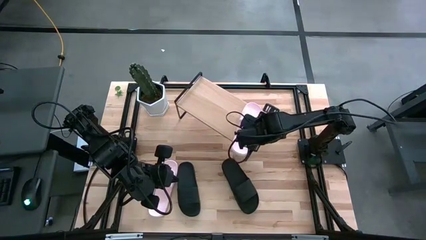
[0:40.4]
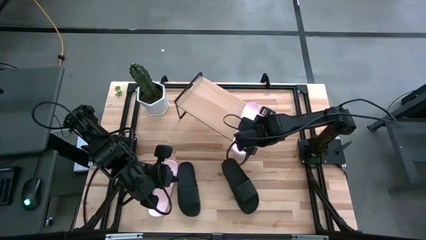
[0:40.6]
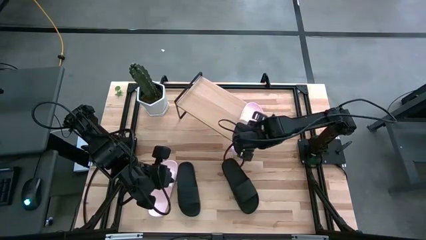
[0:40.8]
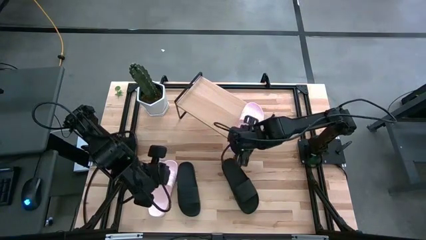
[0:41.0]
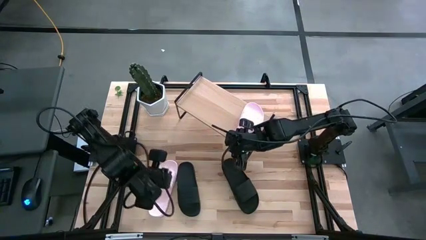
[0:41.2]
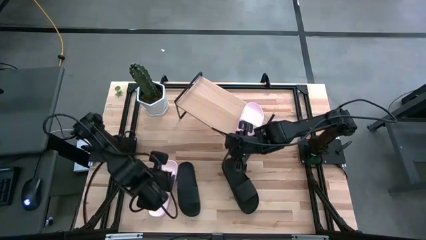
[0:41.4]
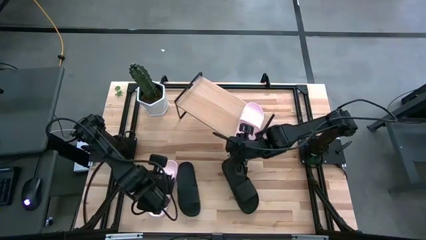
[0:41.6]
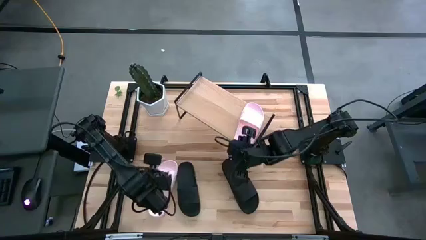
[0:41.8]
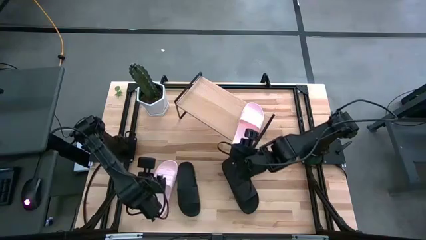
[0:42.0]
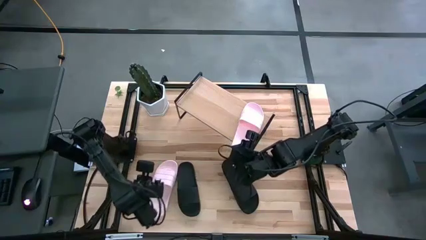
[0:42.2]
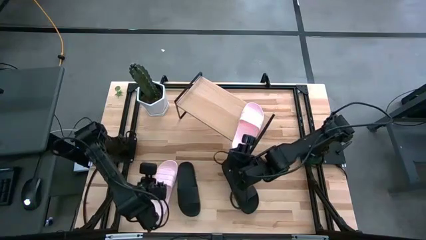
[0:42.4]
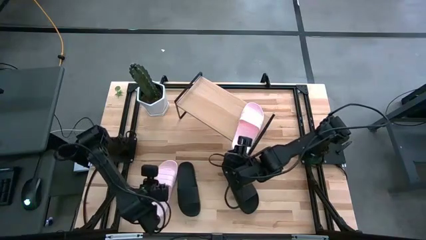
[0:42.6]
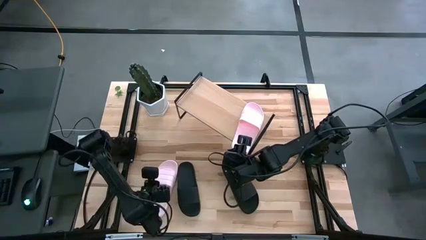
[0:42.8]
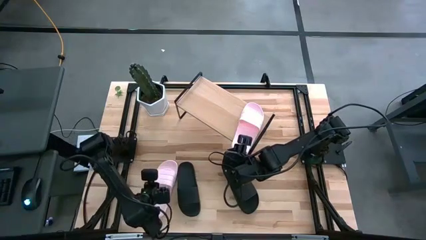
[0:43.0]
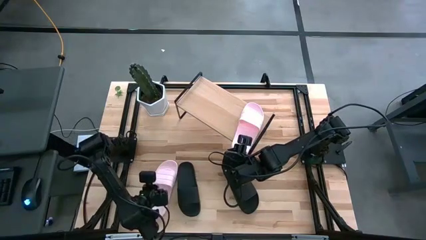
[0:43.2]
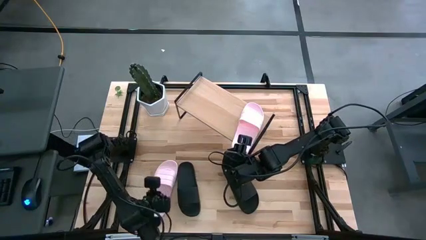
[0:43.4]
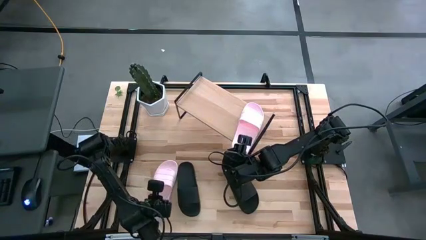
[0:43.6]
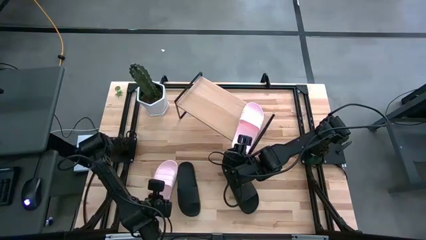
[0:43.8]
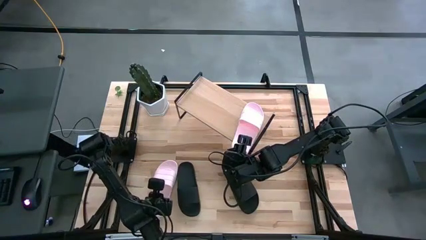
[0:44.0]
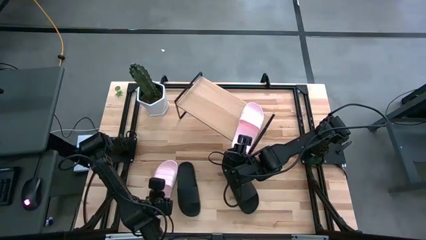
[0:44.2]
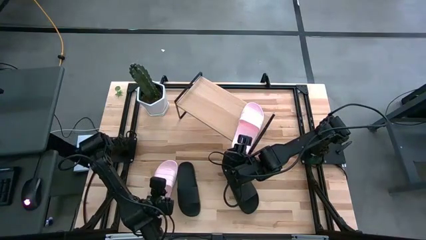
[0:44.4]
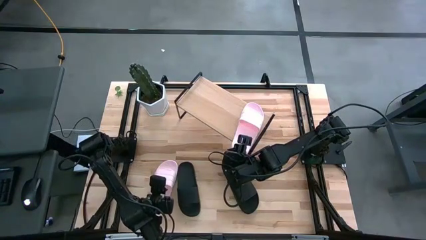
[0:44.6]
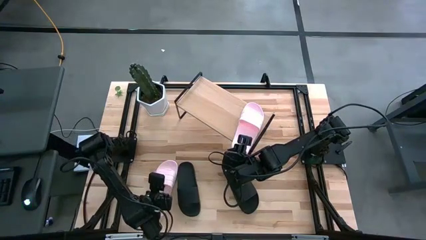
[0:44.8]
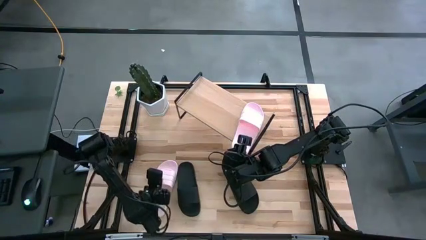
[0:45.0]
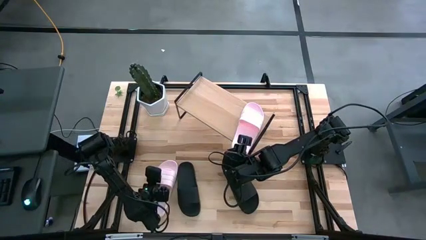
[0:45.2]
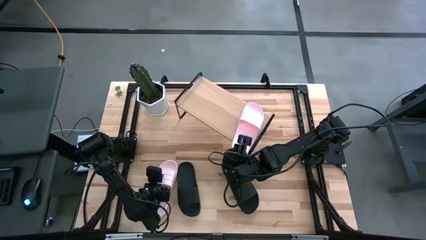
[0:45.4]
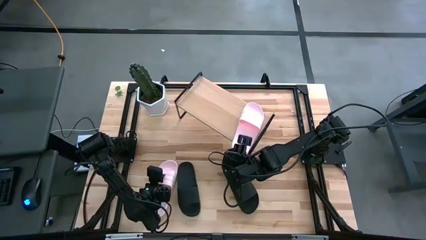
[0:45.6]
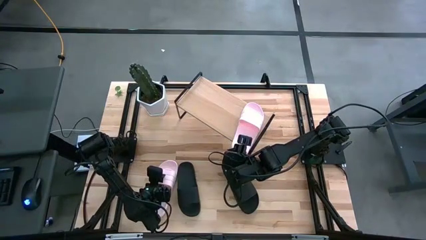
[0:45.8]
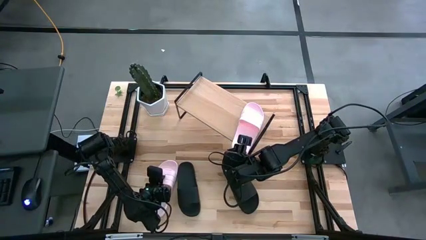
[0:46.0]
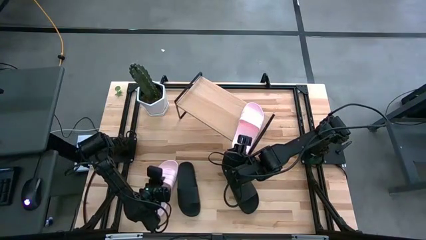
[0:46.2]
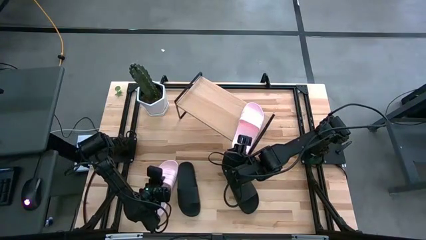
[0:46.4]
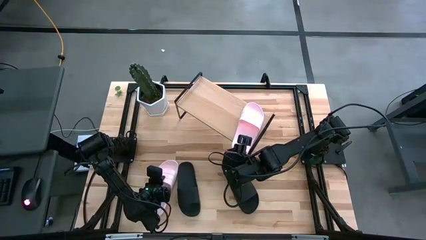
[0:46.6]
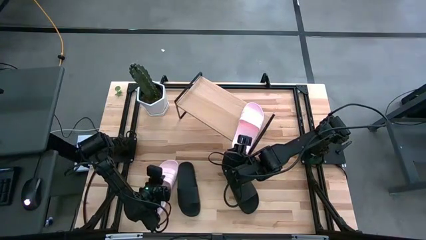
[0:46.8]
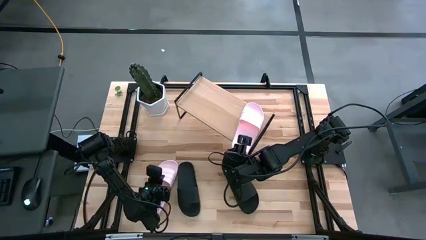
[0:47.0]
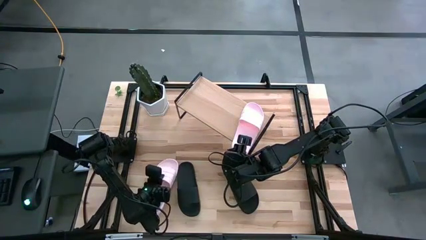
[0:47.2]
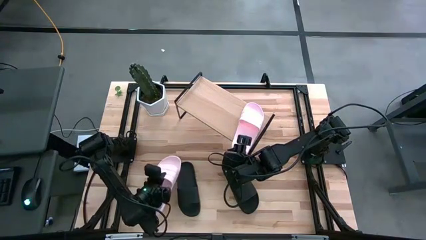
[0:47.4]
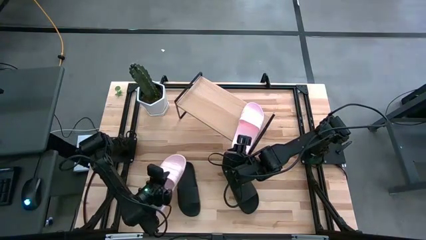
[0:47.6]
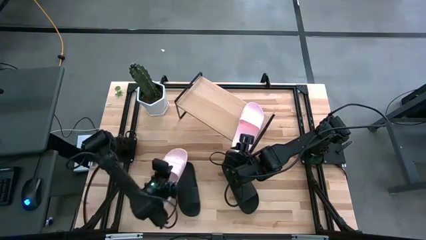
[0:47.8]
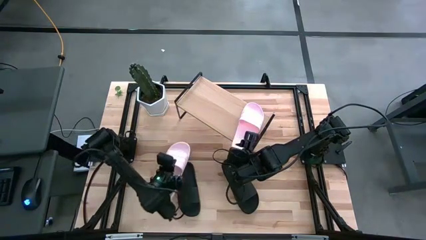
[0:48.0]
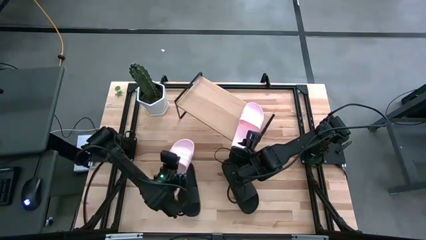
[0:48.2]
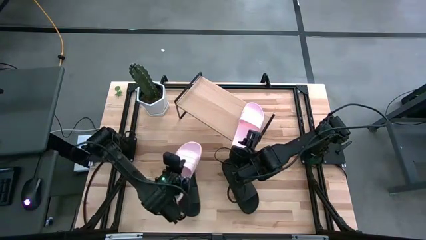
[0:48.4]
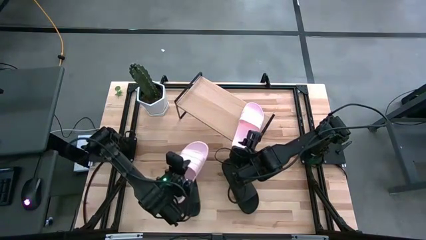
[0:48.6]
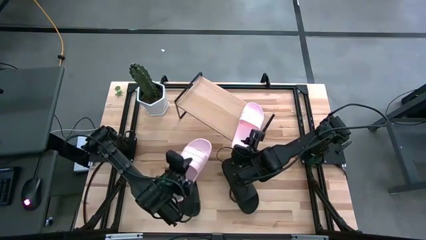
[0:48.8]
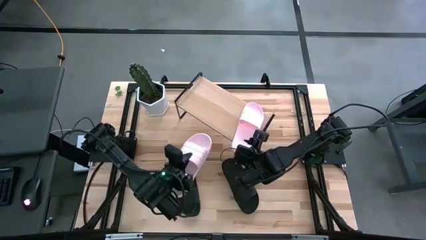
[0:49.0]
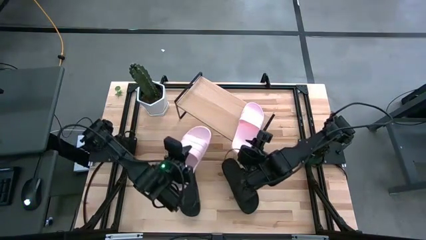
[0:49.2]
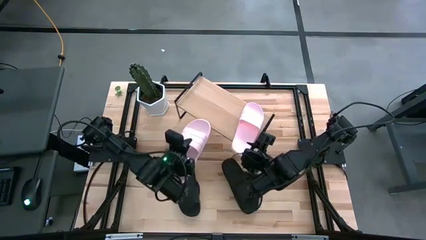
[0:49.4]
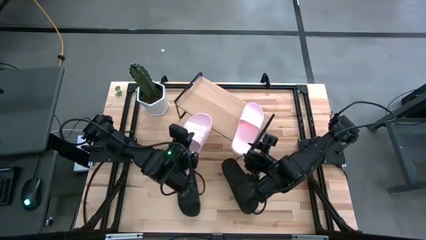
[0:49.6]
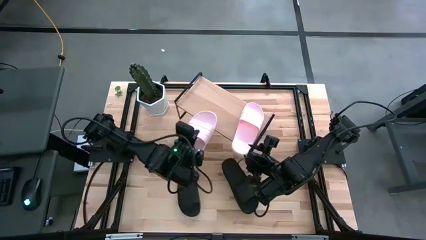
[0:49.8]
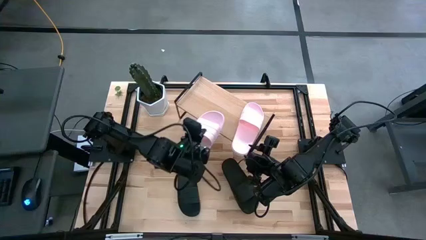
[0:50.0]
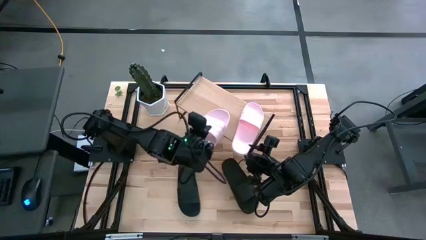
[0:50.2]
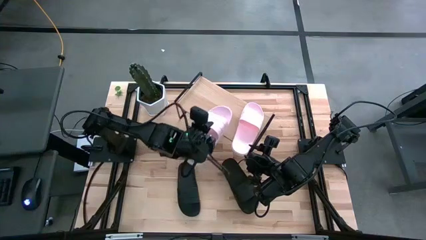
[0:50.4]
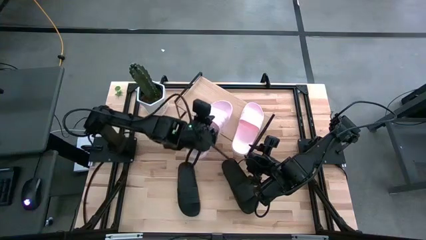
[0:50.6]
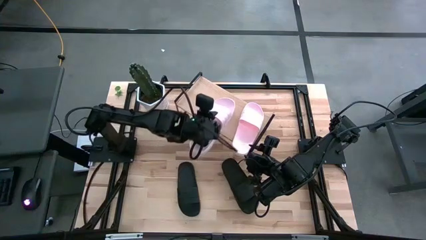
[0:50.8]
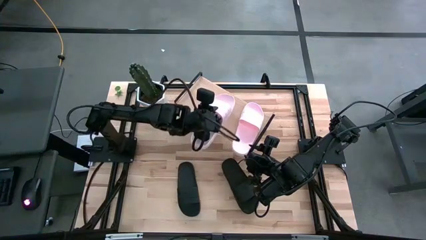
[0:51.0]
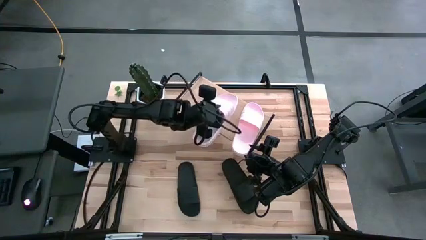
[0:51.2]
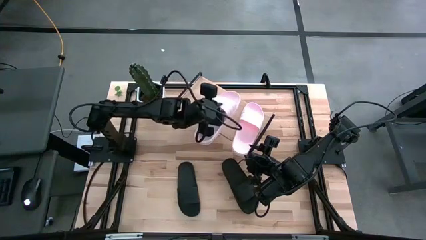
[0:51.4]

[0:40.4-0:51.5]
Task: Pick and place slides into the shelf
Put the pink slipper on the shelf

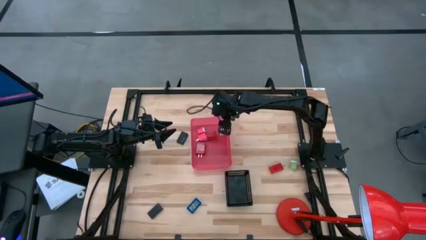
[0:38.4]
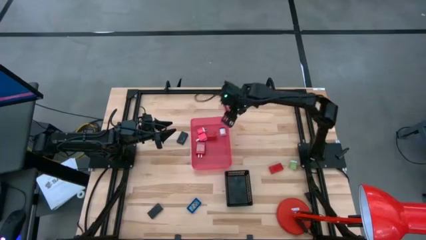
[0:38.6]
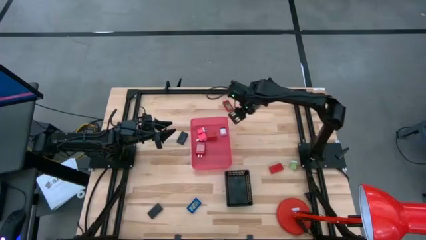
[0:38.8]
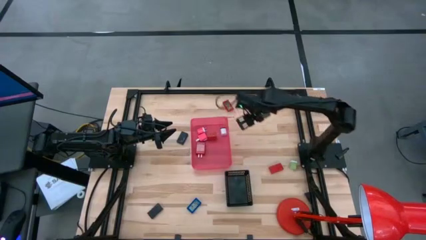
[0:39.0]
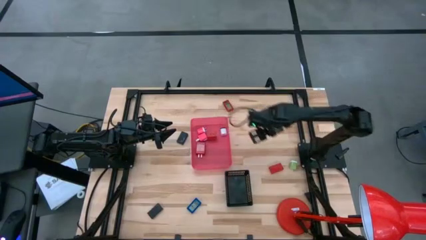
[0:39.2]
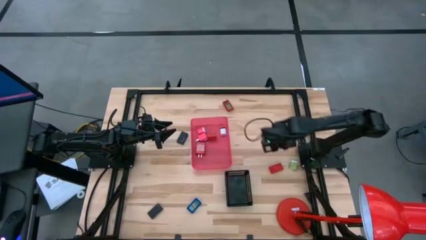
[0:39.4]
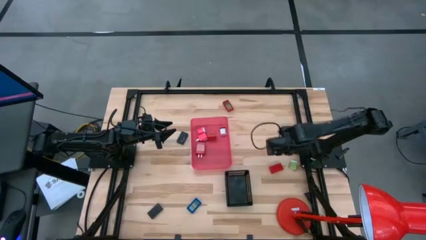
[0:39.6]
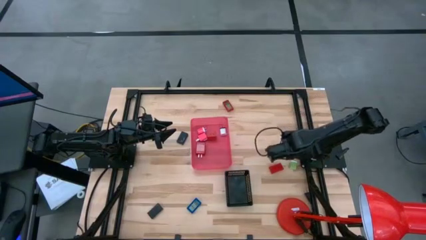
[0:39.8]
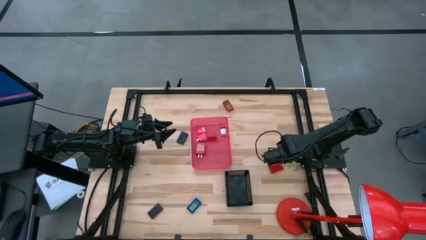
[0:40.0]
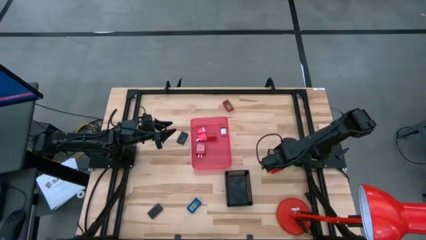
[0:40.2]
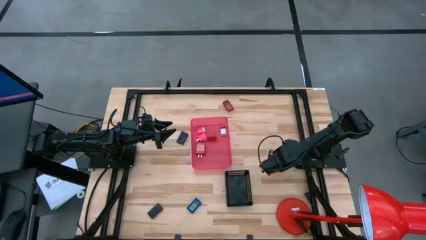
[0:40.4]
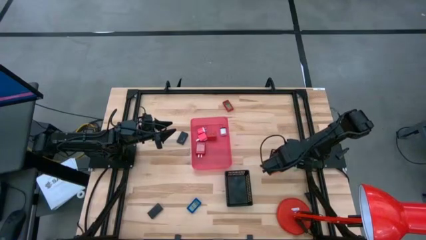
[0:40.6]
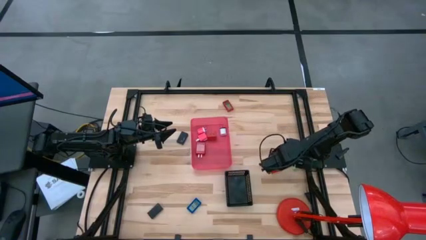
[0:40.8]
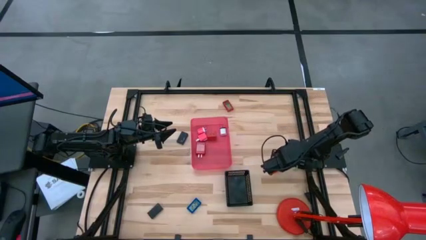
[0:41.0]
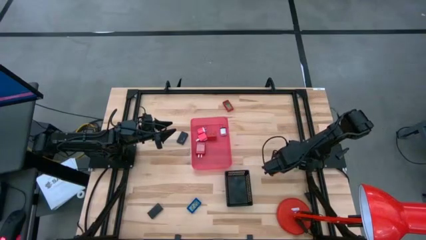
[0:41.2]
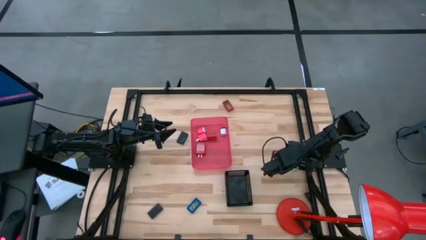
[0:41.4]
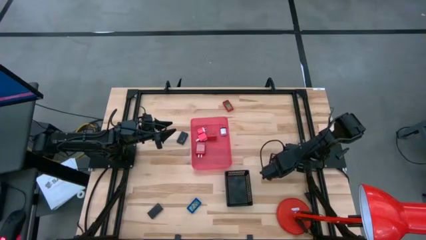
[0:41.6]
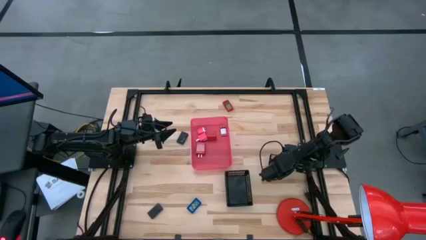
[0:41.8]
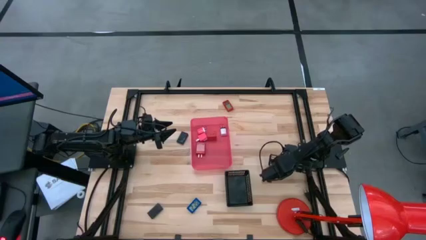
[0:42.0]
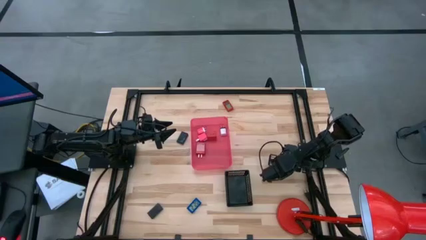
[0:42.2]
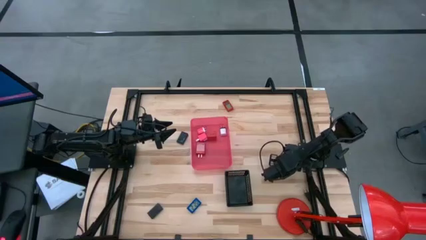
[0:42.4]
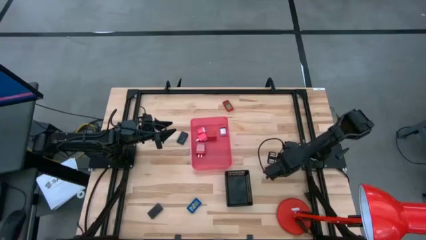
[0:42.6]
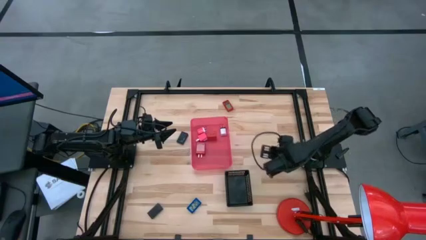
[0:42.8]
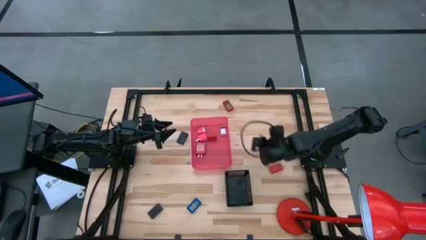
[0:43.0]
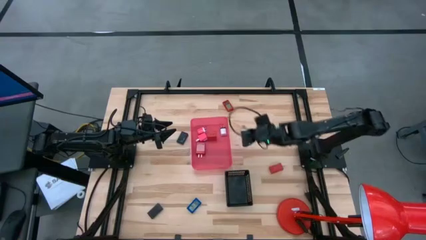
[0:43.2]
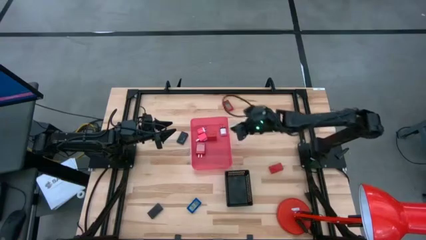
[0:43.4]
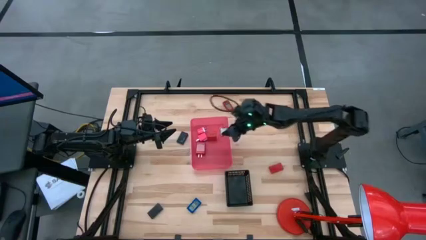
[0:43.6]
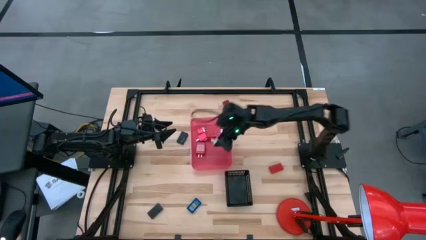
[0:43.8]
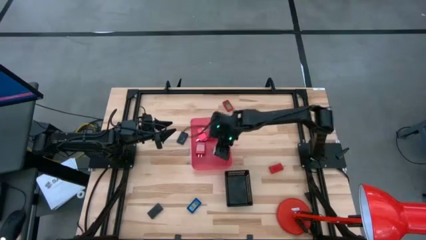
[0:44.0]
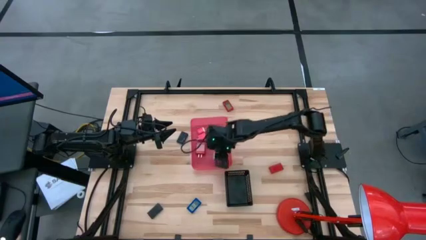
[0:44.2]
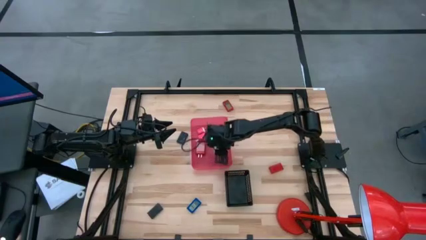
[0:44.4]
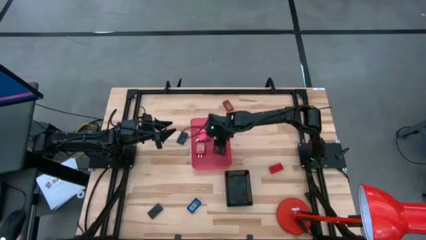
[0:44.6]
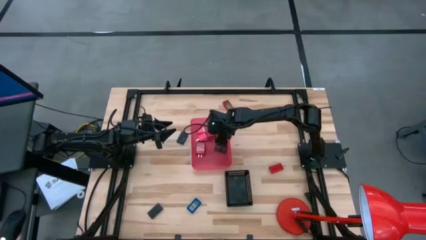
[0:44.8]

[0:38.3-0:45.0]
Task: Pick & Place Office items
Put the green charger adapter into the pink bin
